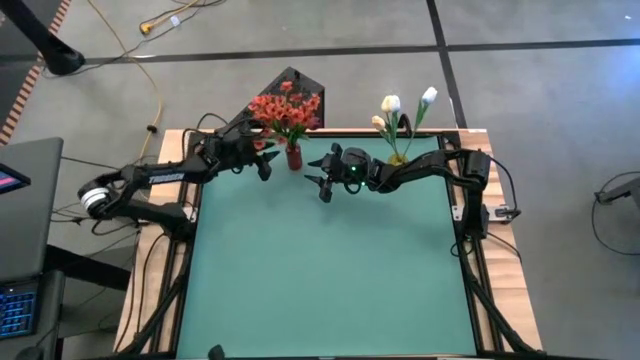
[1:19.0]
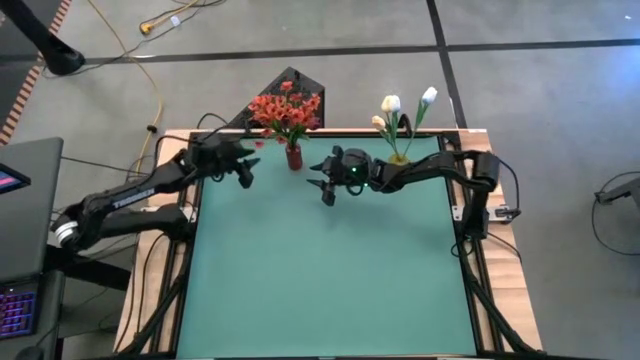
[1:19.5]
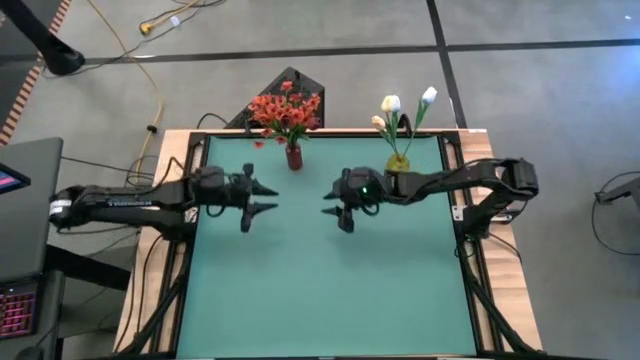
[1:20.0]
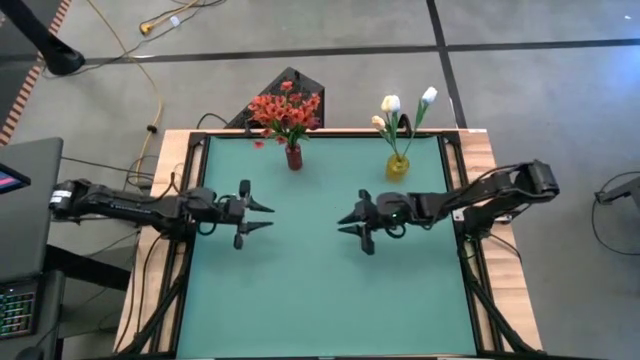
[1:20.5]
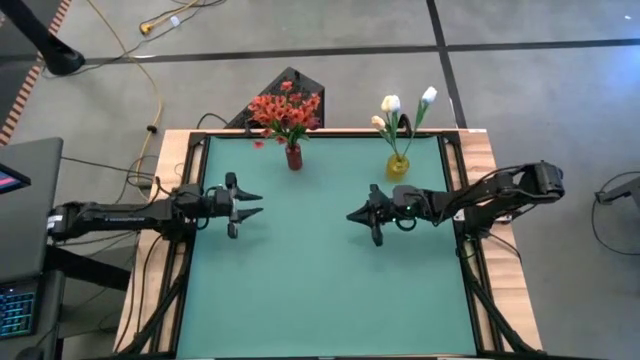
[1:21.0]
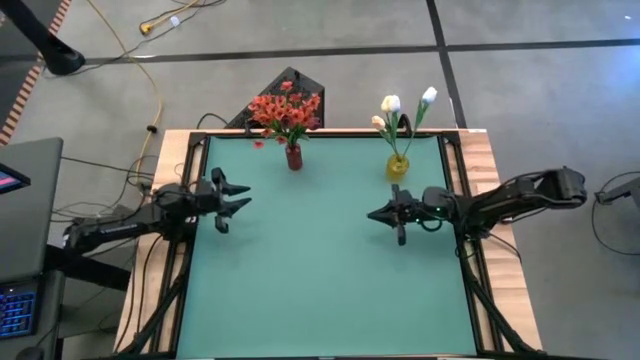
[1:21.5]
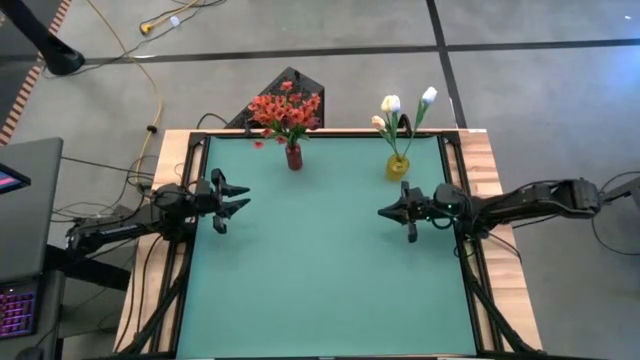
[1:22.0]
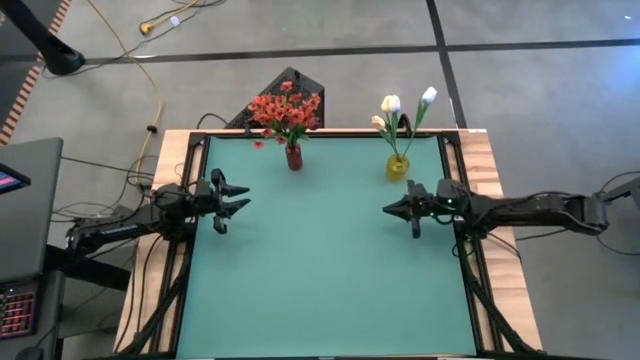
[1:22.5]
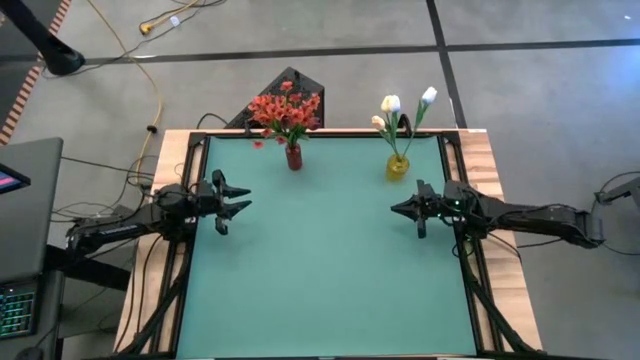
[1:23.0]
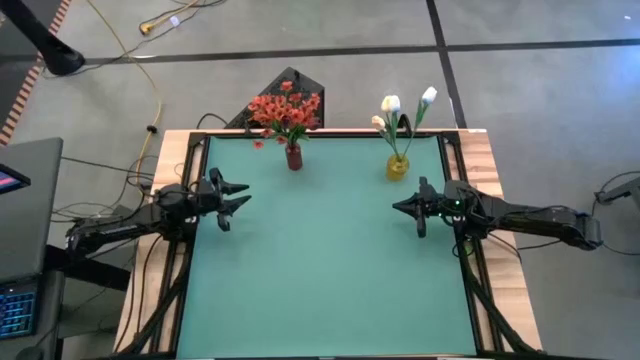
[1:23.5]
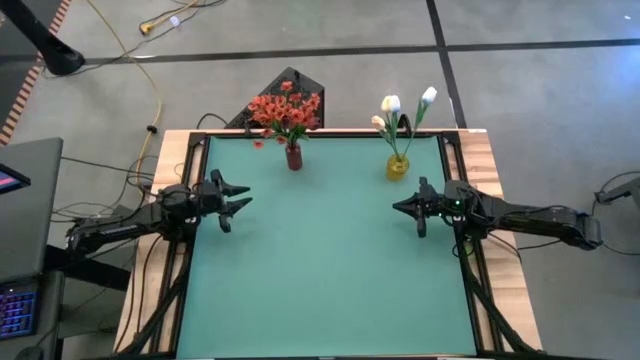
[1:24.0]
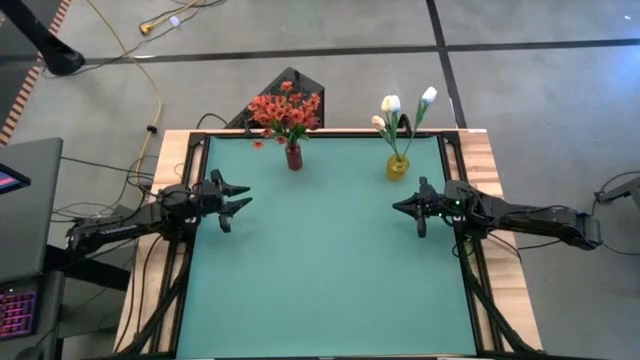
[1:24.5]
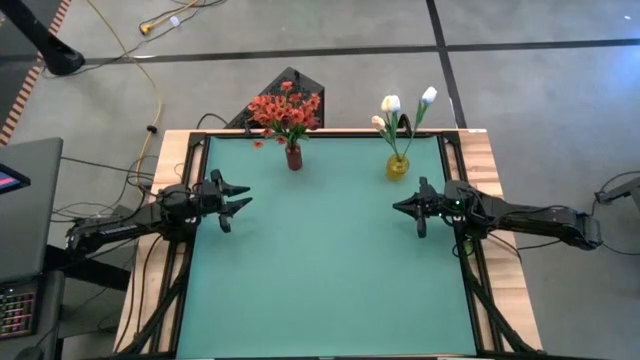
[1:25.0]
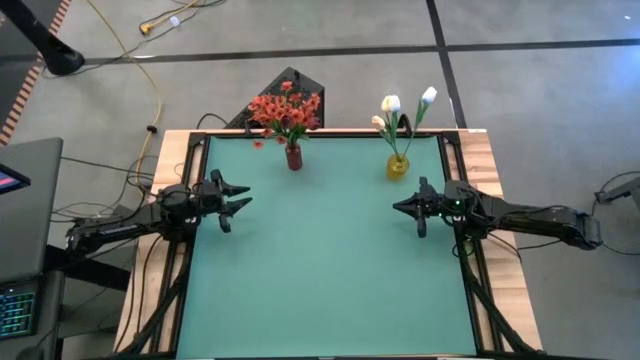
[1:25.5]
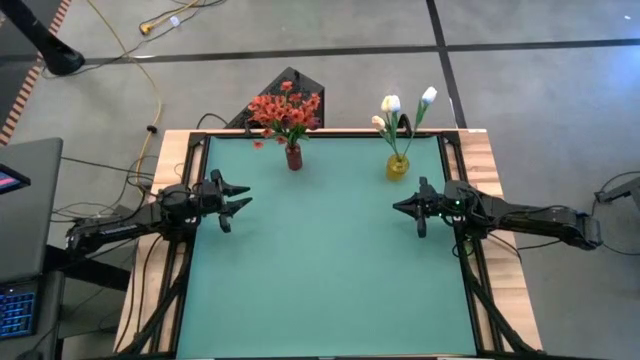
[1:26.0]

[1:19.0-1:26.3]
Task: Sort flowers into vase by color
Return to Home Position

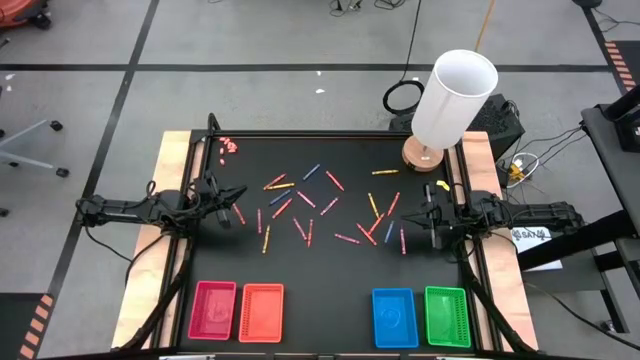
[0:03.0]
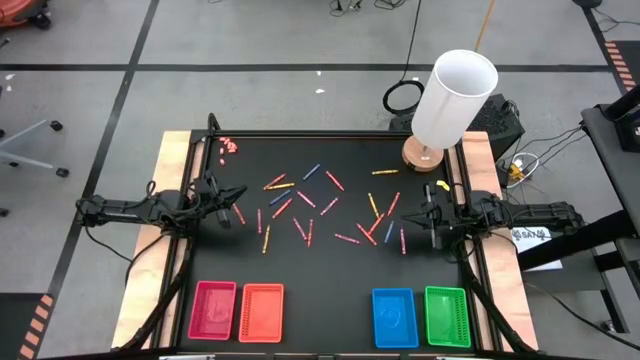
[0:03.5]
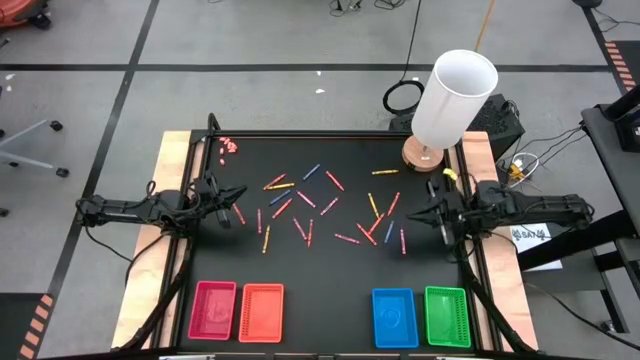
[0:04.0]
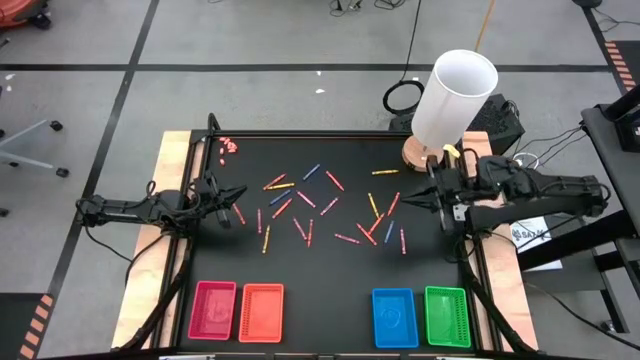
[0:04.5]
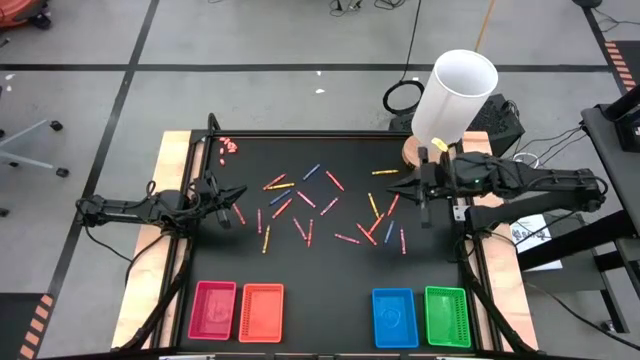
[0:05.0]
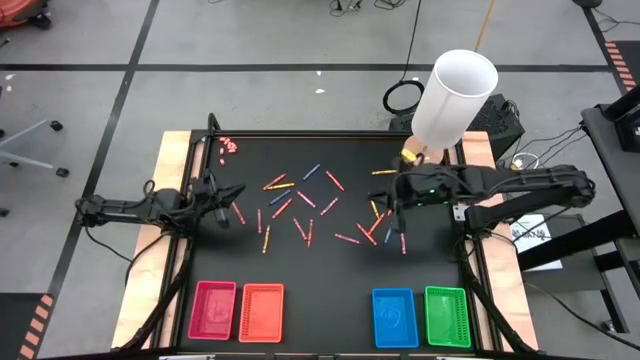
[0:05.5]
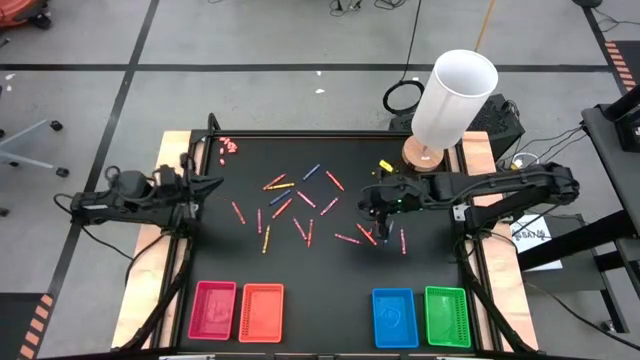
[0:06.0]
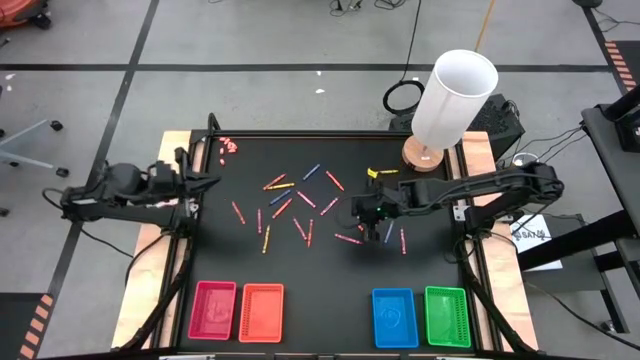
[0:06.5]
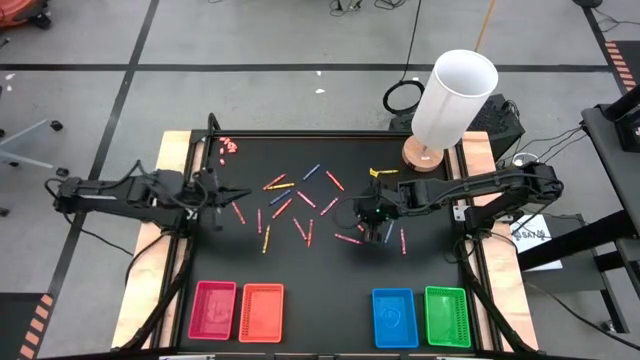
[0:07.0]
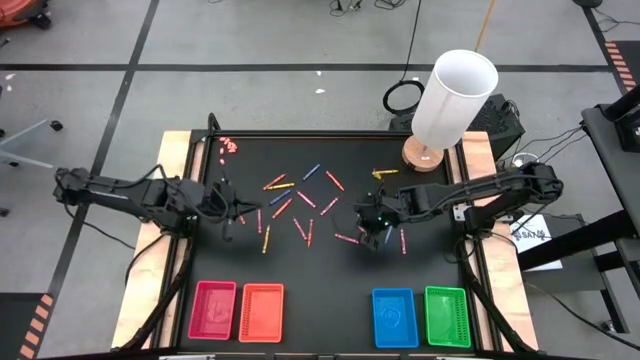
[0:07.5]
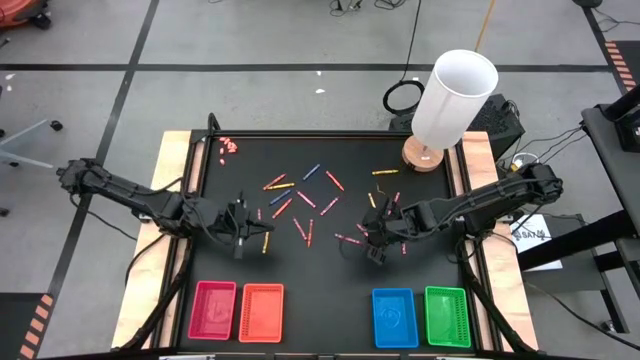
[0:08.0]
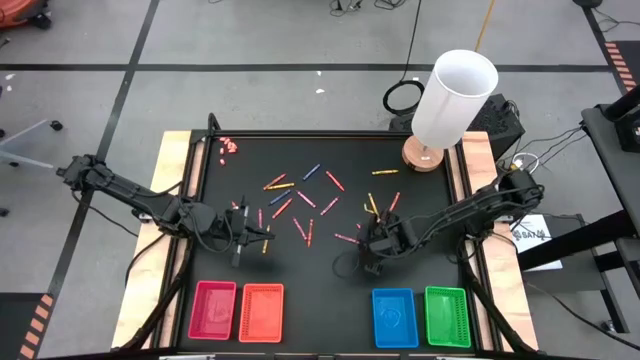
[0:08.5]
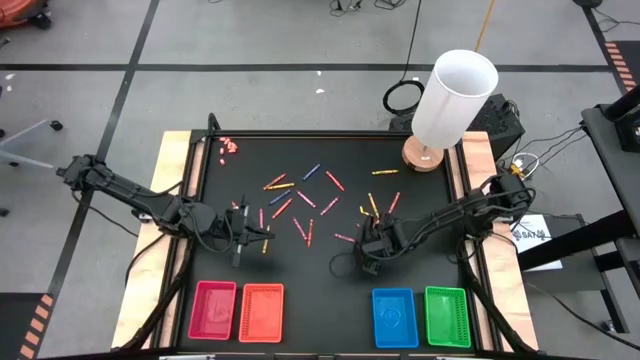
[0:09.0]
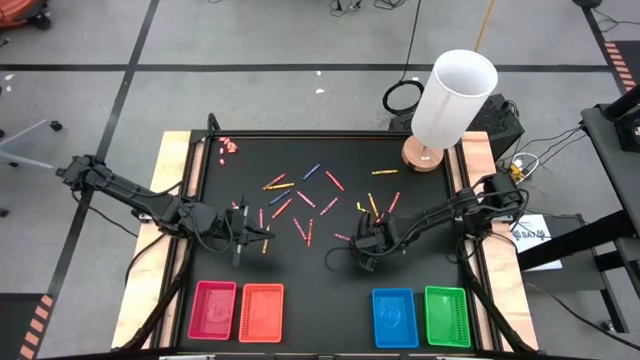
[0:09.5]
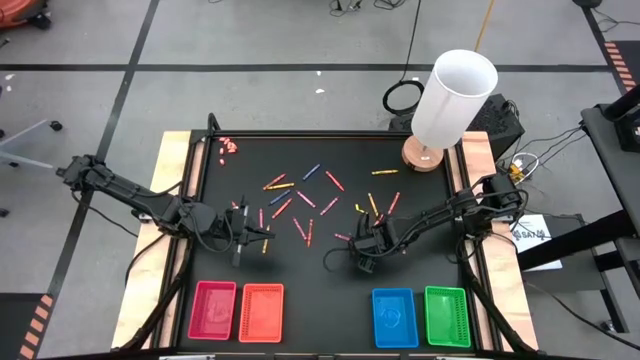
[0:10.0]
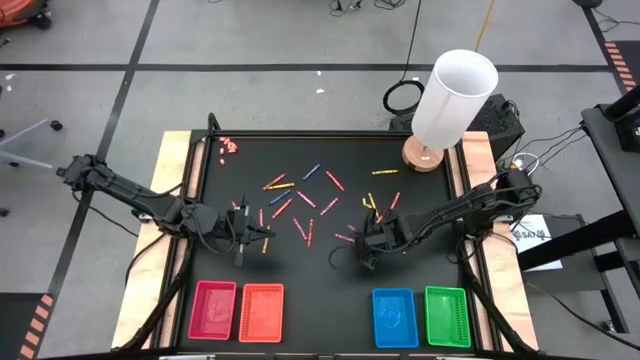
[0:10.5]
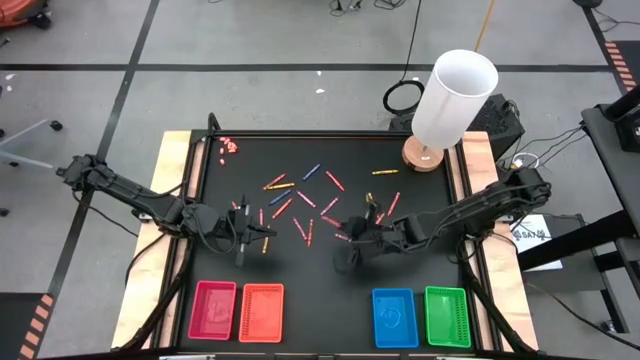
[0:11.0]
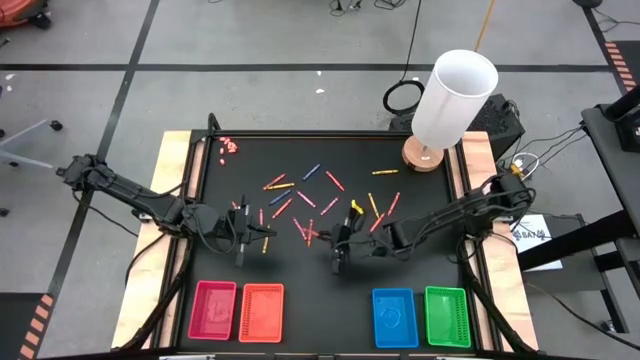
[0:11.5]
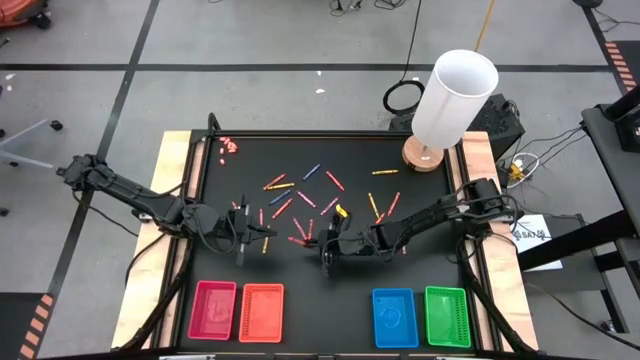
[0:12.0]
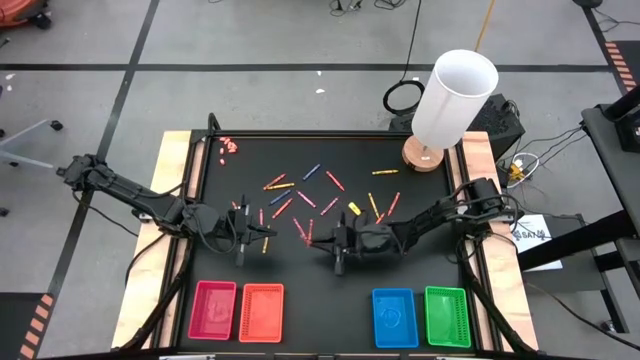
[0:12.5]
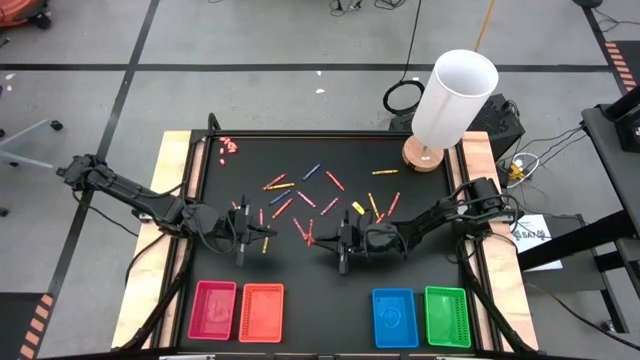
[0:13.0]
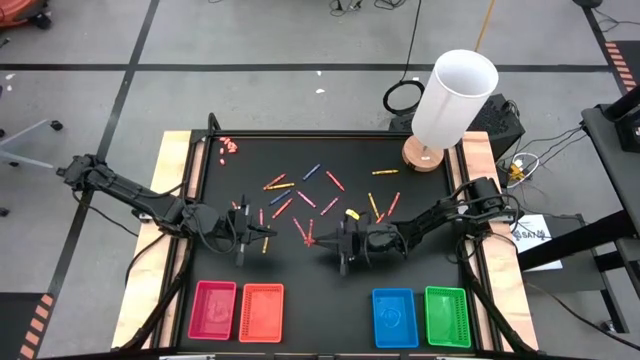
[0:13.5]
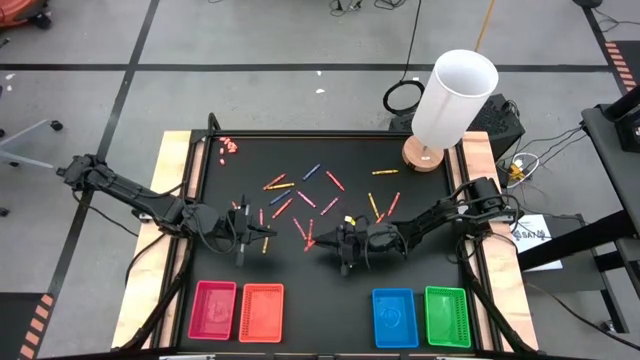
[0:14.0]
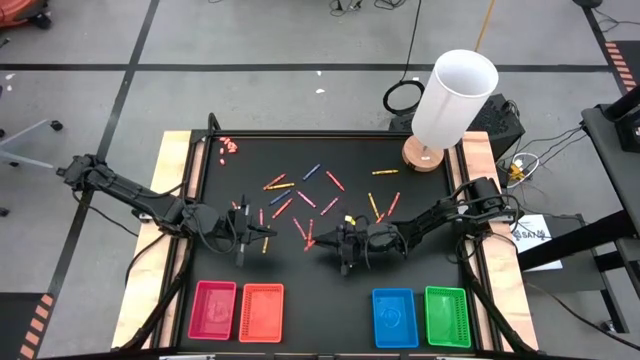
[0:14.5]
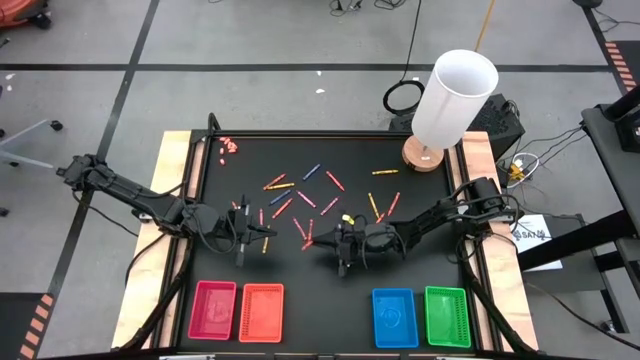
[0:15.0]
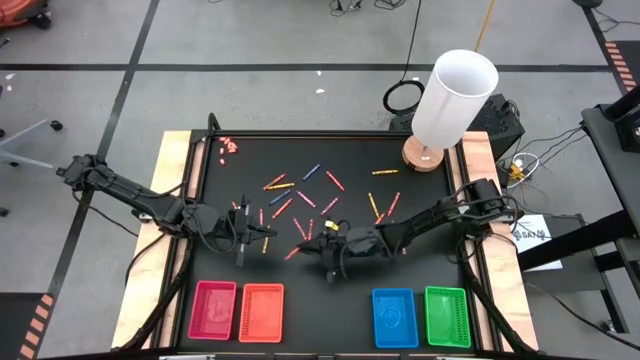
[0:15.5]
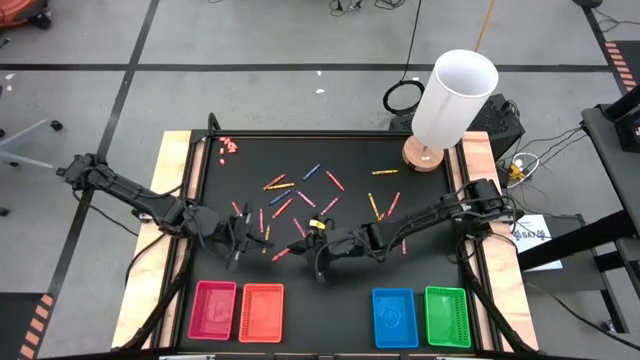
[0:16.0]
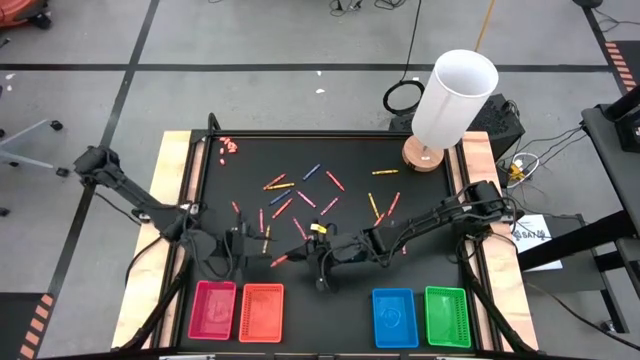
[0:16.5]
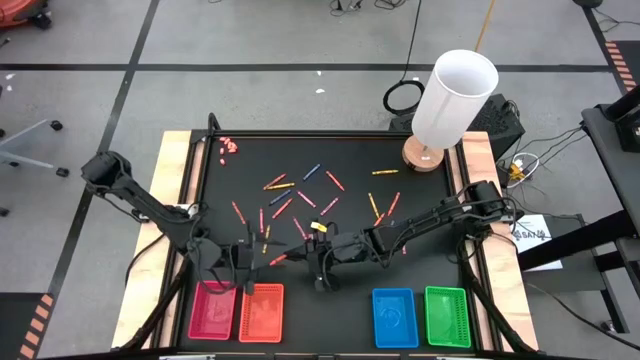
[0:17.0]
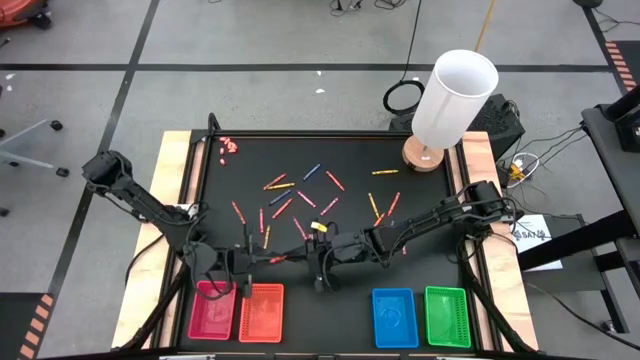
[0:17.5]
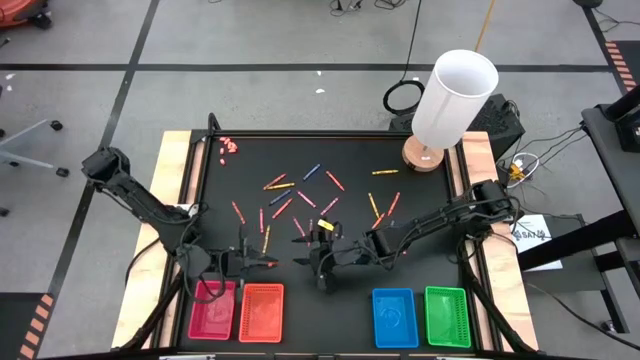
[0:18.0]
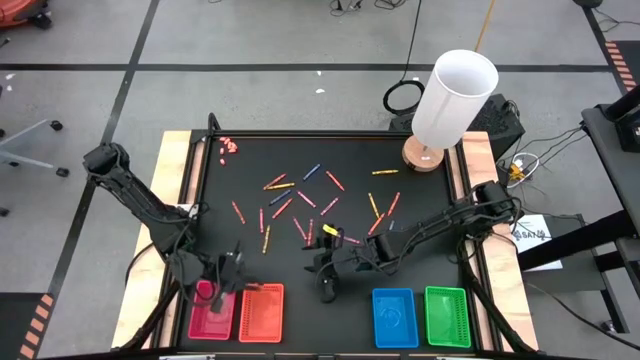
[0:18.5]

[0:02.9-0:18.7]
Task: Sort crayons
Put the orange crayon into the orange bin
